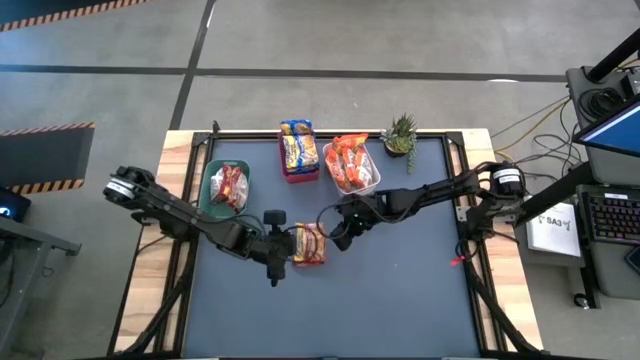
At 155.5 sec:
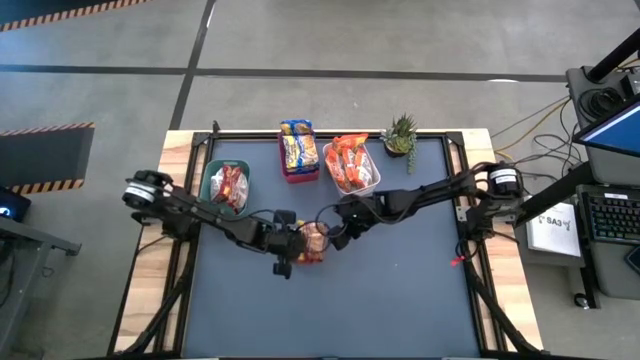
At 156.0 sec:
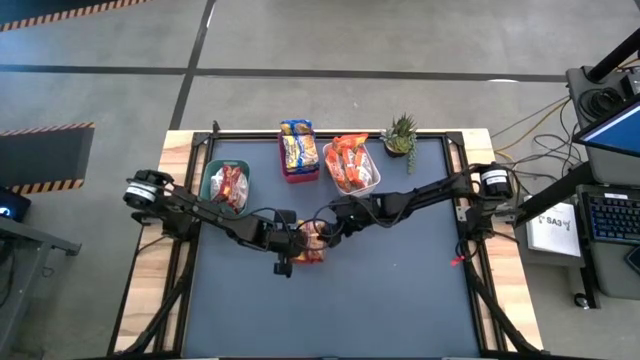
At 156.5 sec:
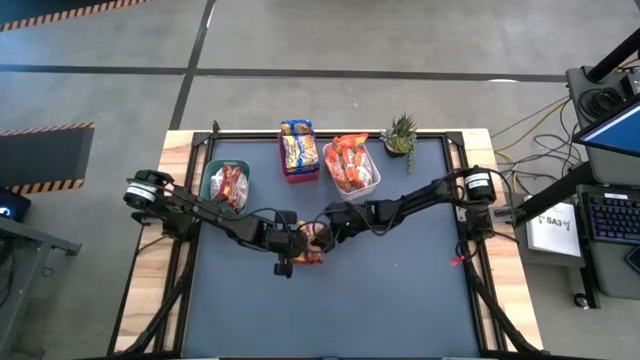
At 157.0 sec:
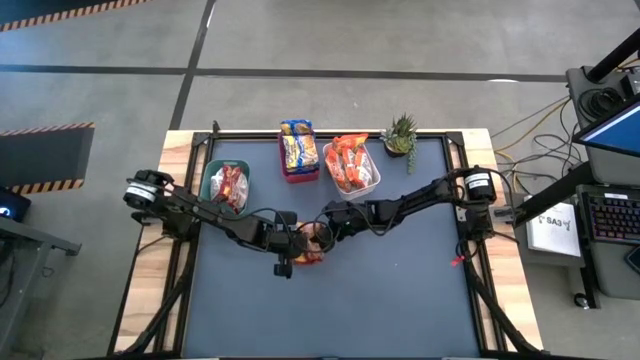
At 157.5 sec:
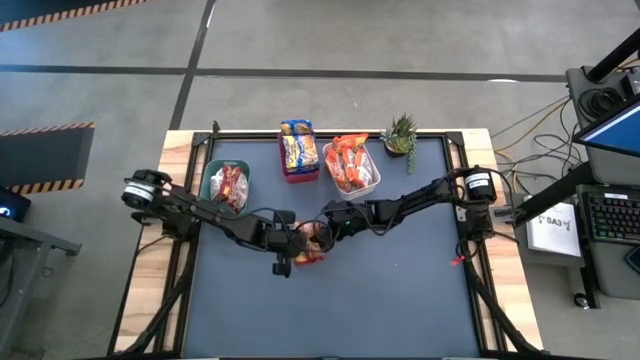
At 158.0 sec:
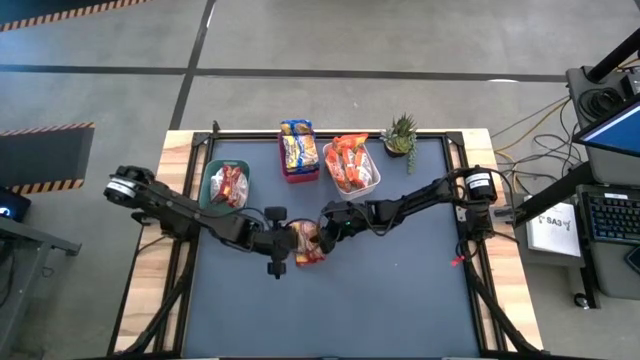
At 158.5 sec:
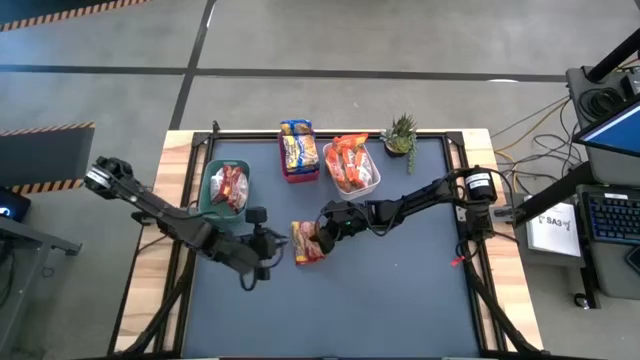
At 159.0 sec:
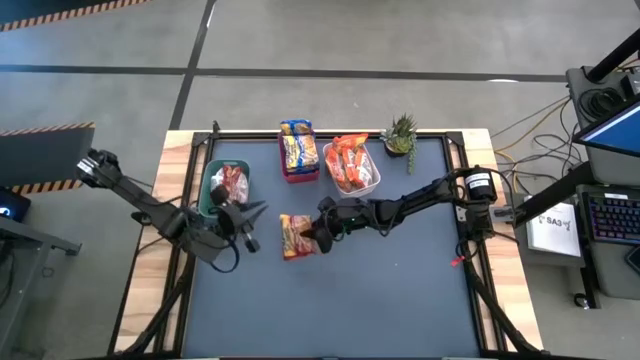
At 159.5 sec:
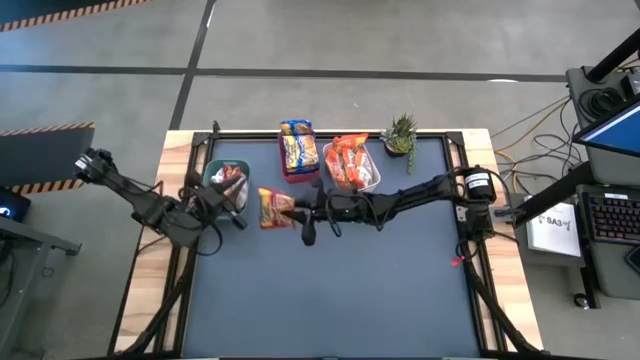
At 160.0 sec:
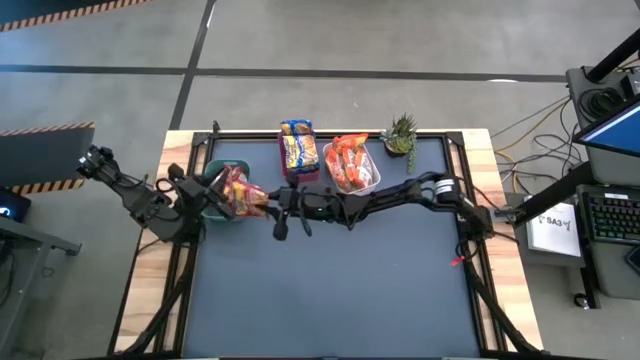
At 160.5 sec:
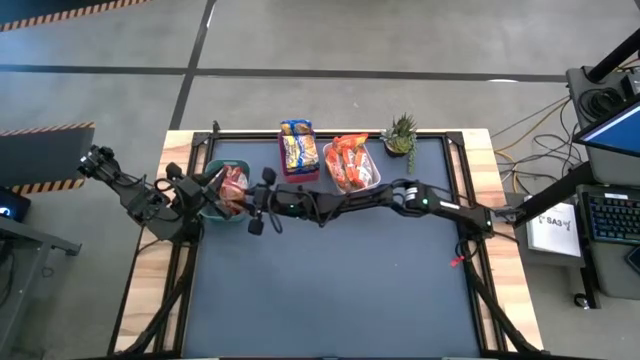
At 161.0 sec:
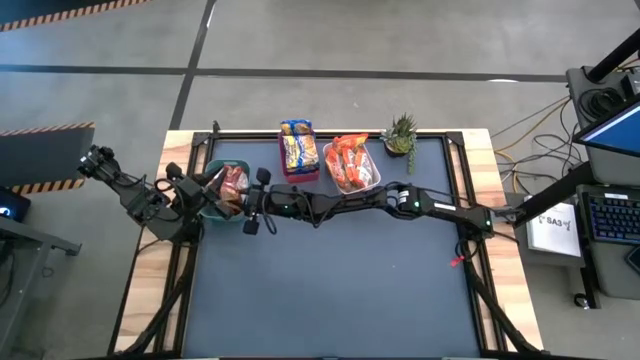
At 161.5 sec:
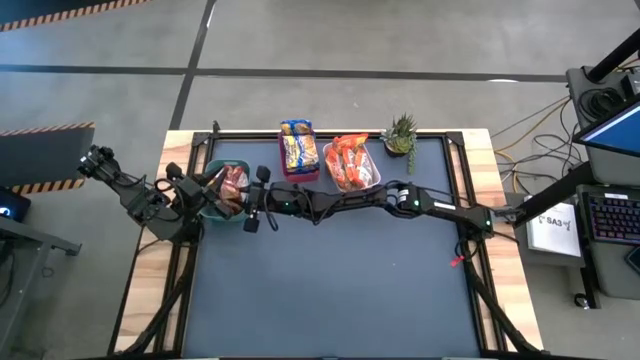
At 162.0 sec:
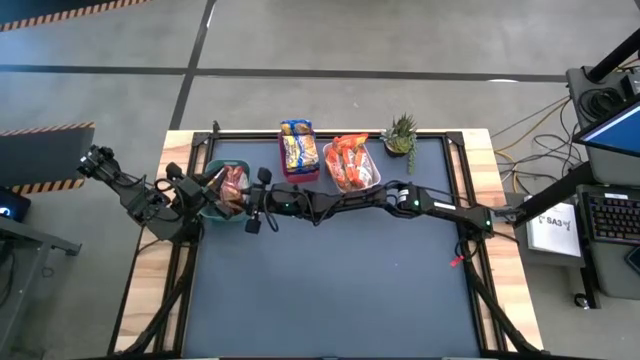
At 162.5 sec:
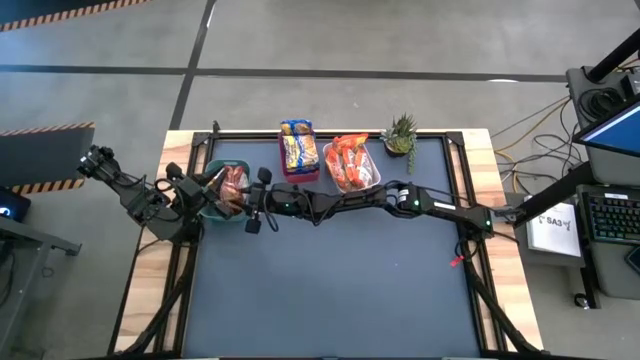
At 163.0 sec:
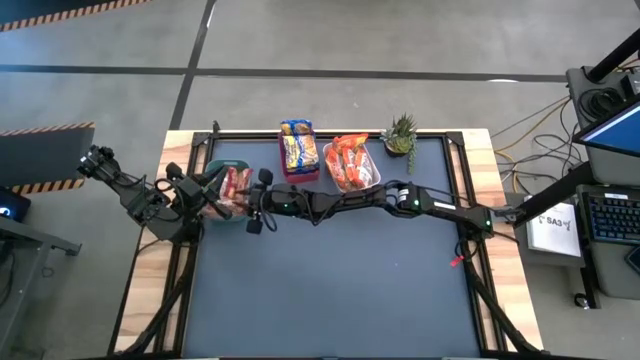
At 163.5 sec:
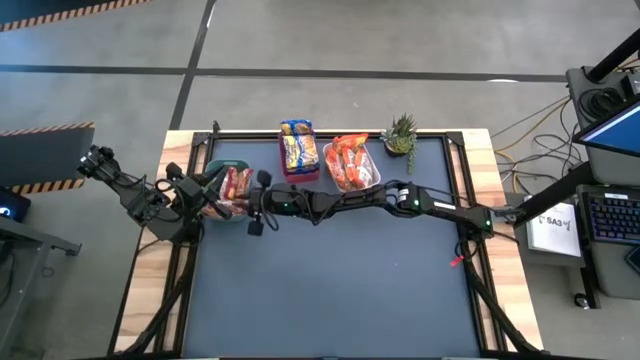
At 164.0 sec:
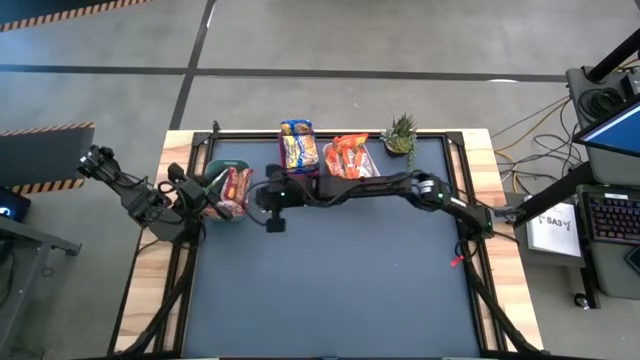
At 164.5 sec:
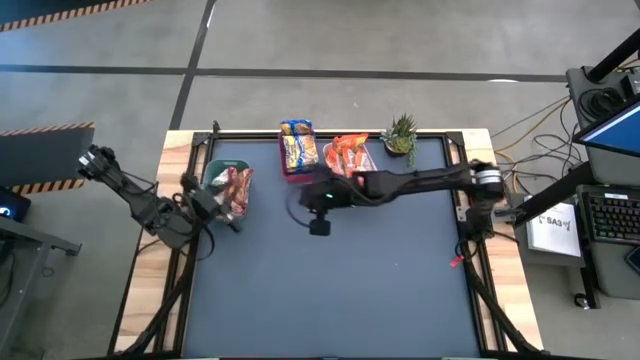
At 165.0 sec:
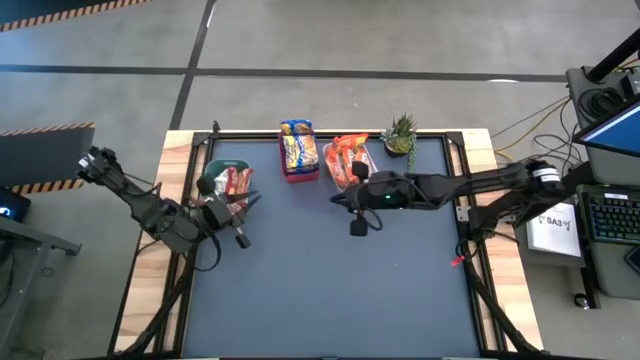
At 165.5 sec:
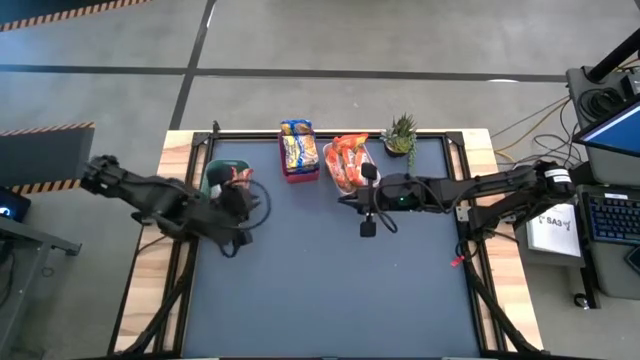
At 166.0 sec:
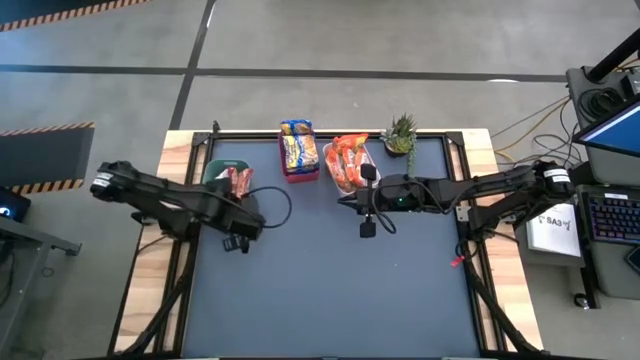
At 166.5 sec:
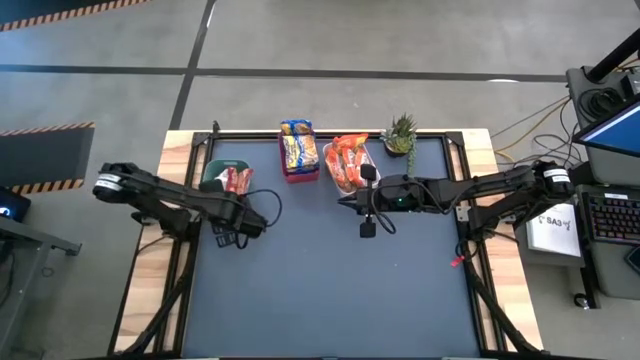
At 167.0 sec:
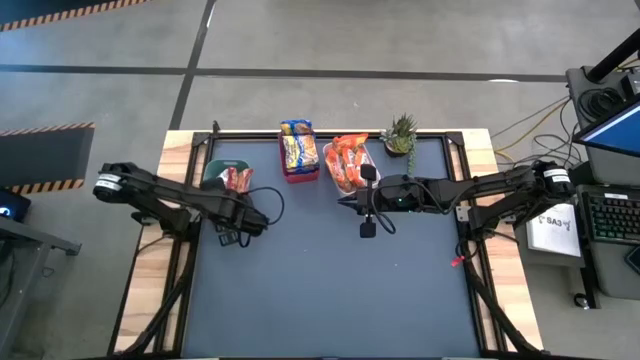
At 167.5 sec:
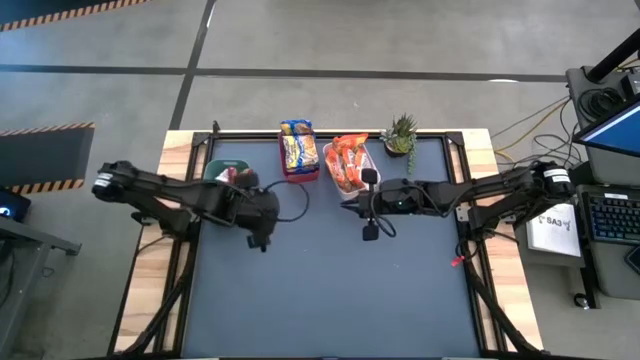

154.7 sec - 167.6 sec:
Task: Sort Maruchan noodles
Put the red noodle pack into the green bin

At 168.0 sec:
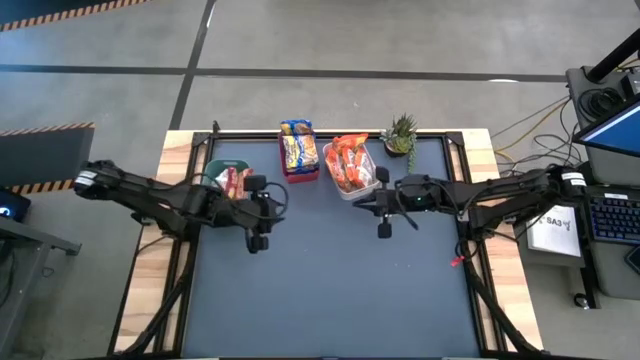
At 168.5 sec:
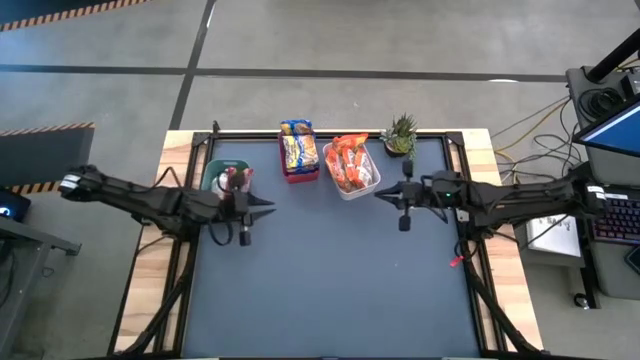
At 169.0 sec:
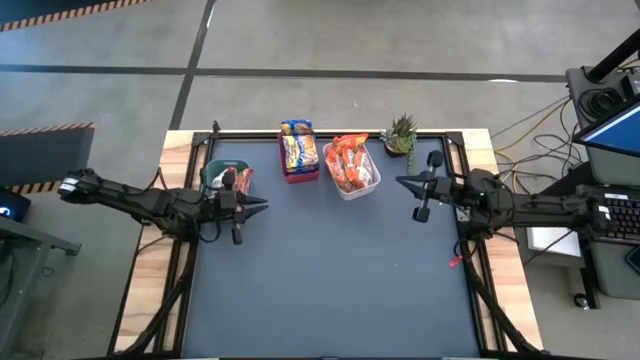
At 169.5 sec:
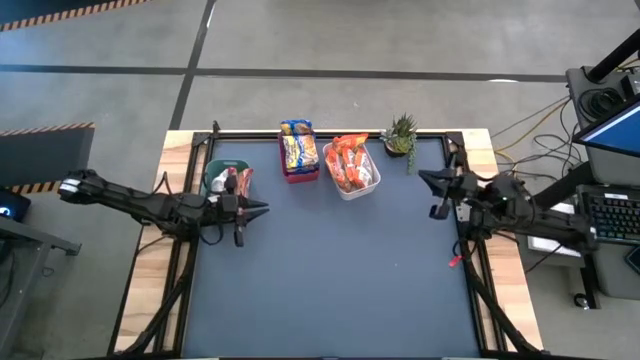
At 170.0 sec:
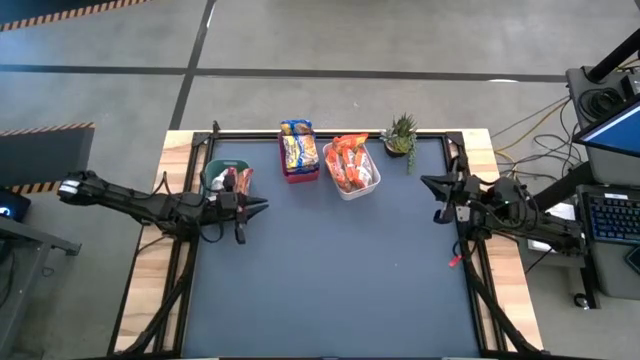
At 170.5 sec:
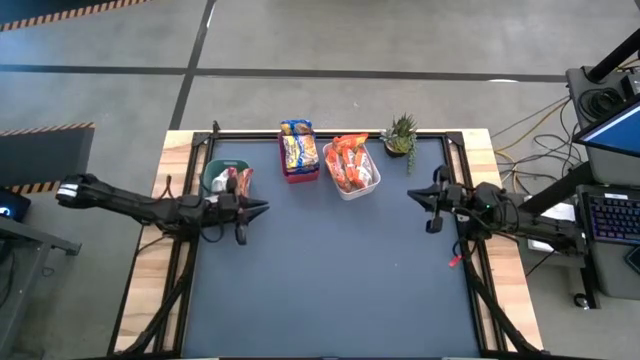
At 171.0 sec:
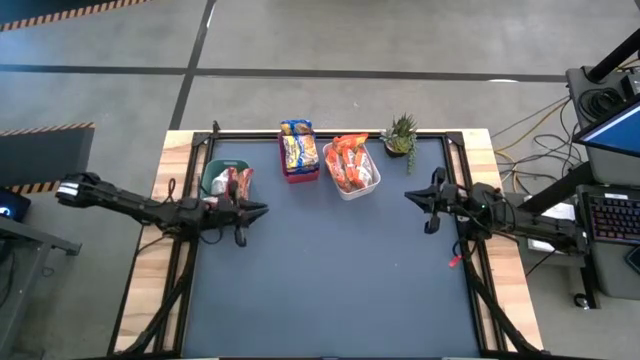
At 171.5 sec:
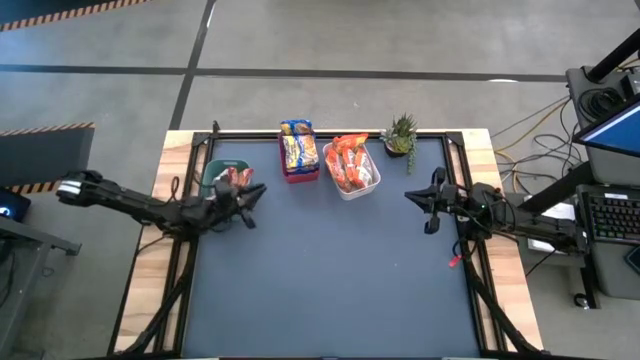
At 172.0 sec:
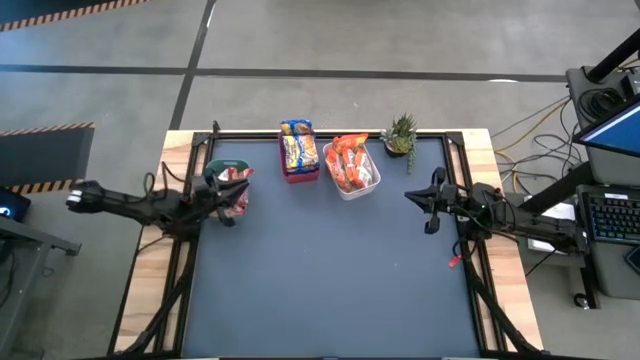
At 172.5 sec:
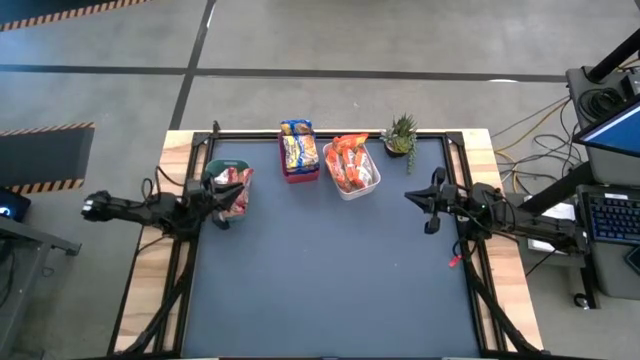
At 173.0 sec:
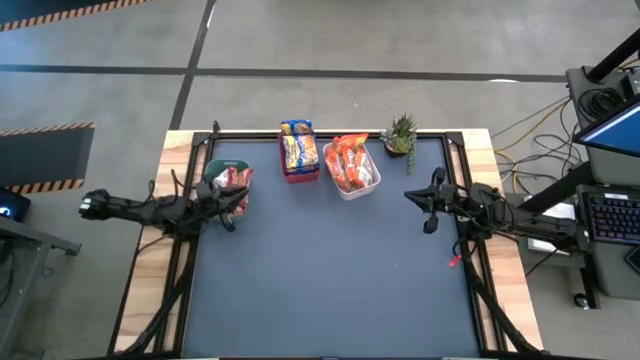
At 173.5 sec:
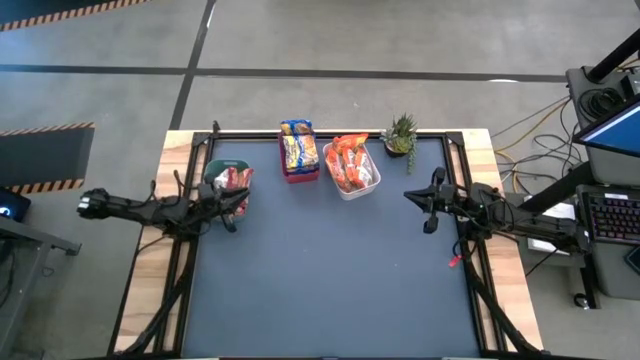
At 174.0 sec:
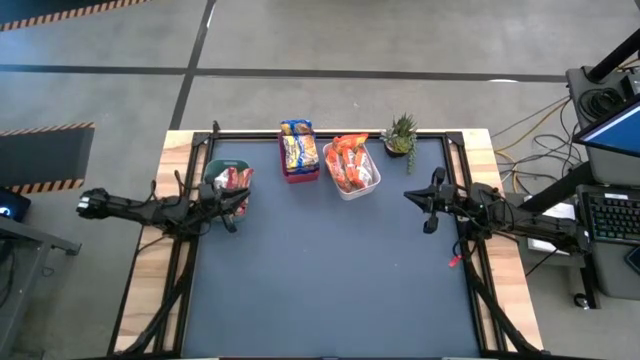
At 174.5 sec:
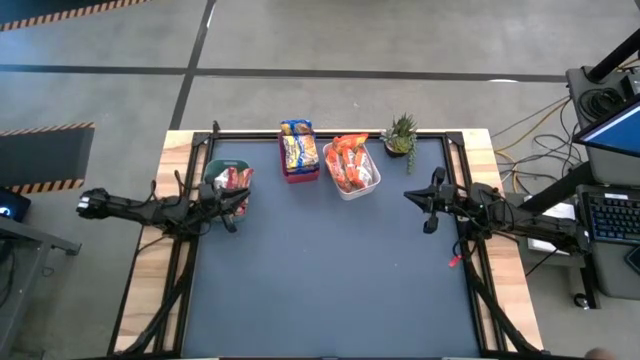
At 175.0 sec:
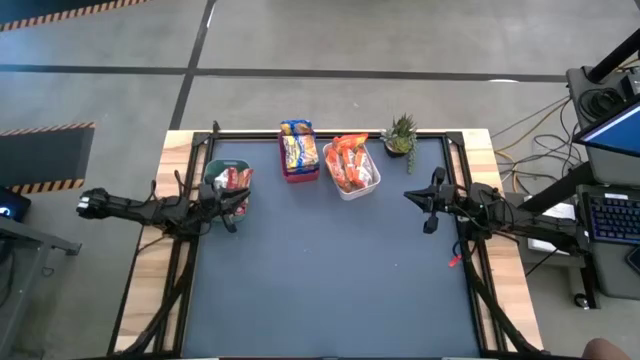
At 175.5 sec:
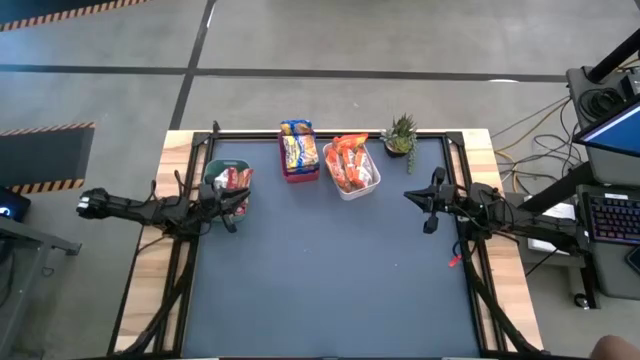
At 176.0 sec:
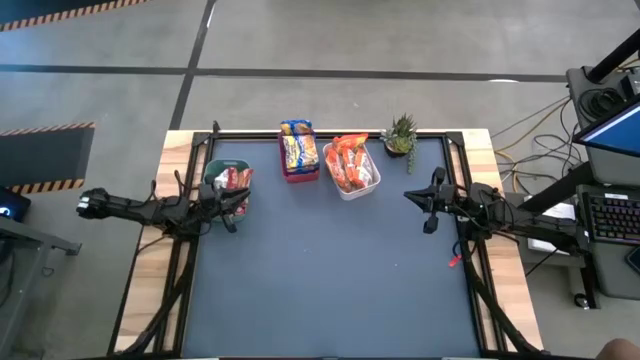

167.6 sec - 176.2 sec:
Return to Home Position
